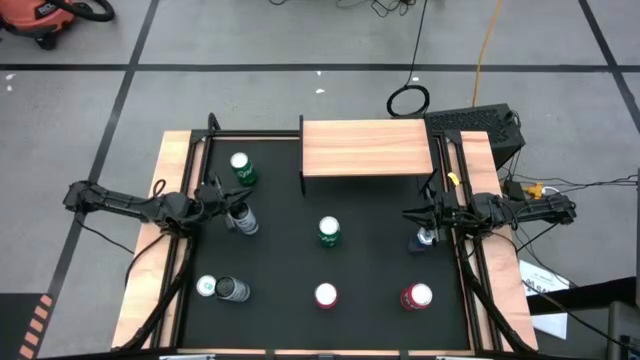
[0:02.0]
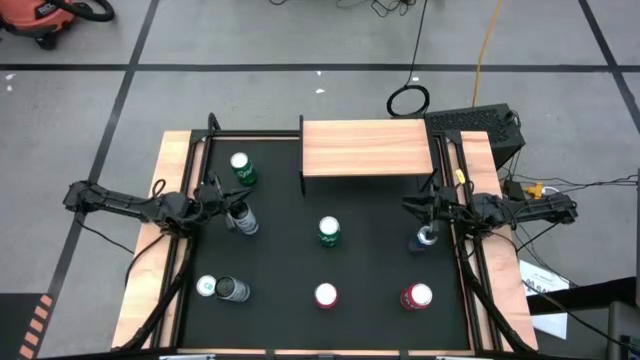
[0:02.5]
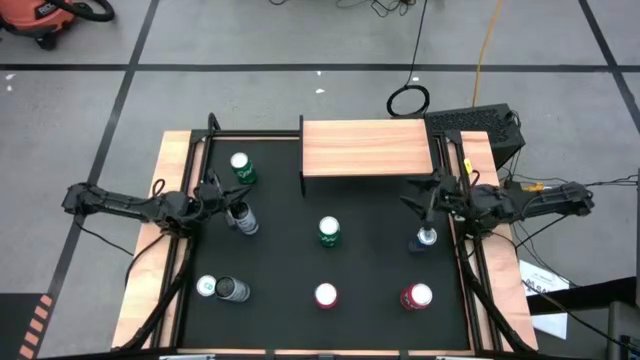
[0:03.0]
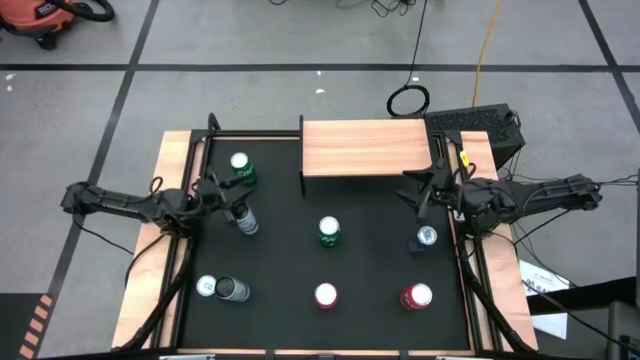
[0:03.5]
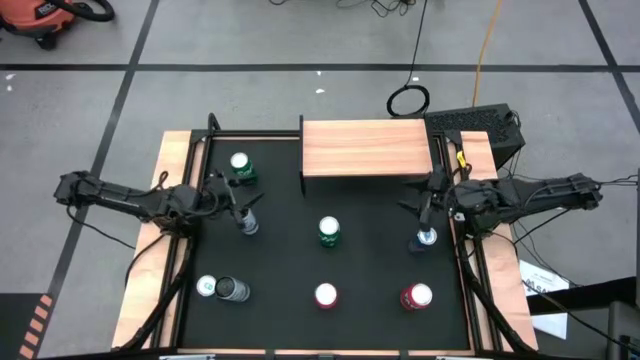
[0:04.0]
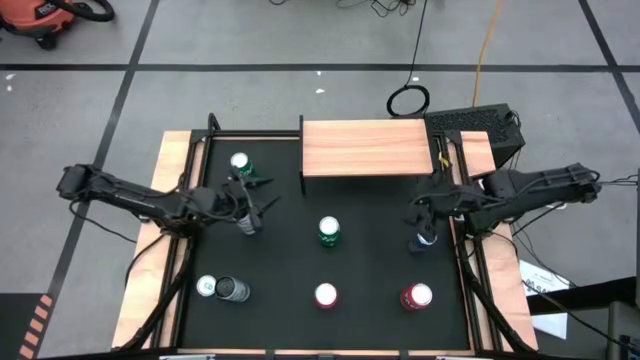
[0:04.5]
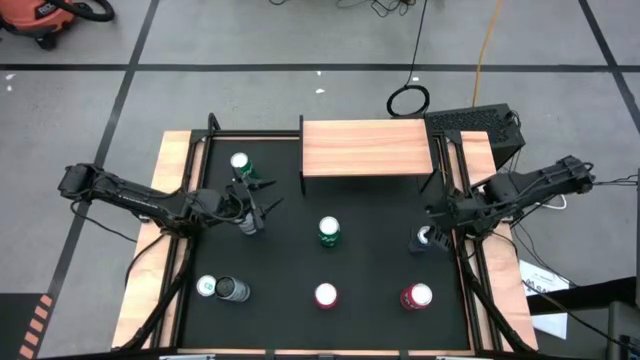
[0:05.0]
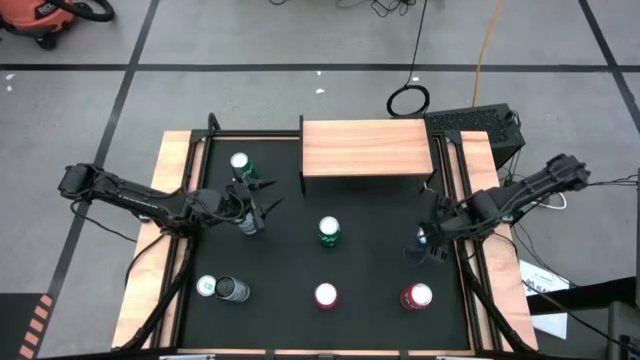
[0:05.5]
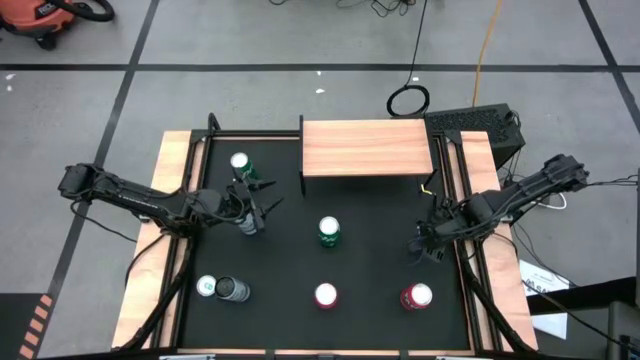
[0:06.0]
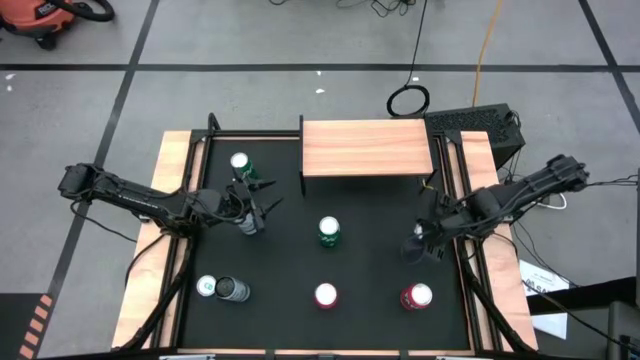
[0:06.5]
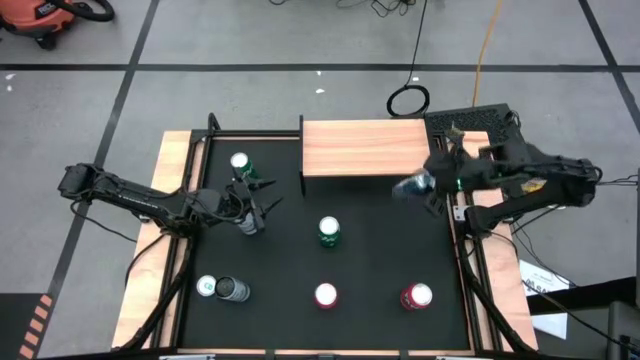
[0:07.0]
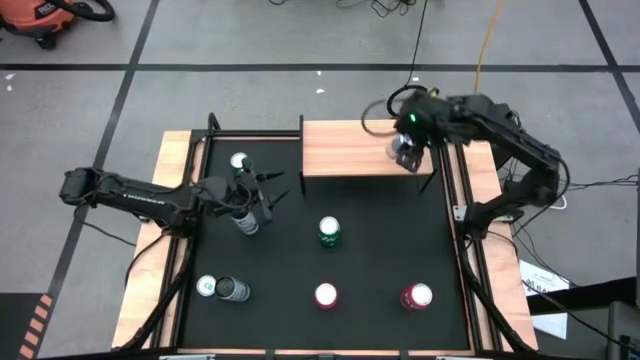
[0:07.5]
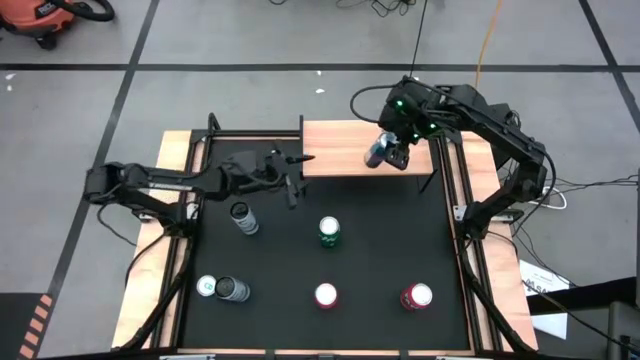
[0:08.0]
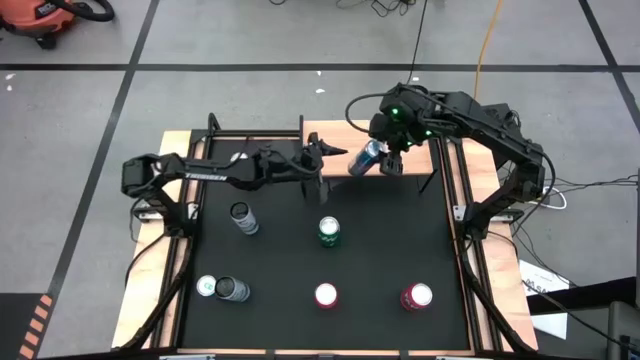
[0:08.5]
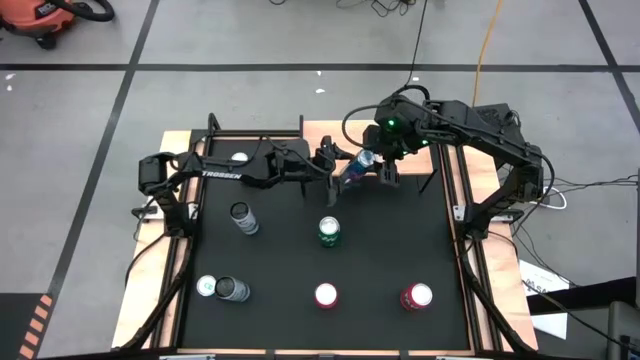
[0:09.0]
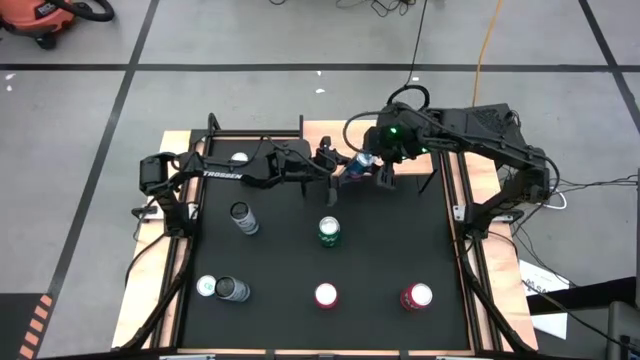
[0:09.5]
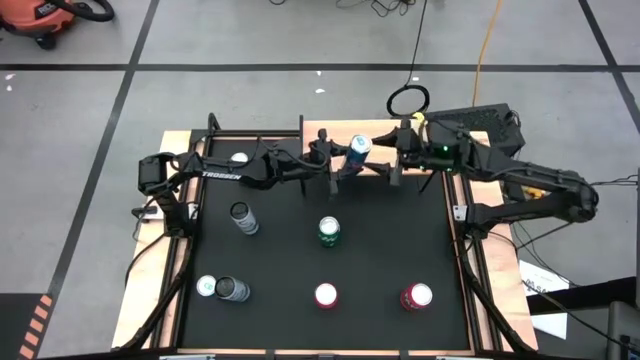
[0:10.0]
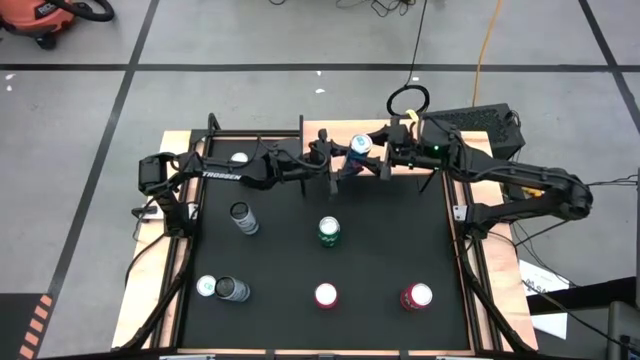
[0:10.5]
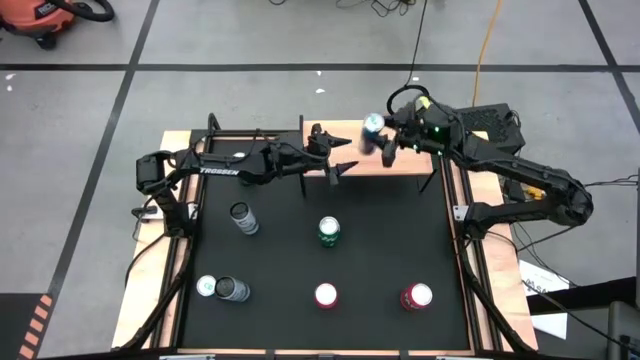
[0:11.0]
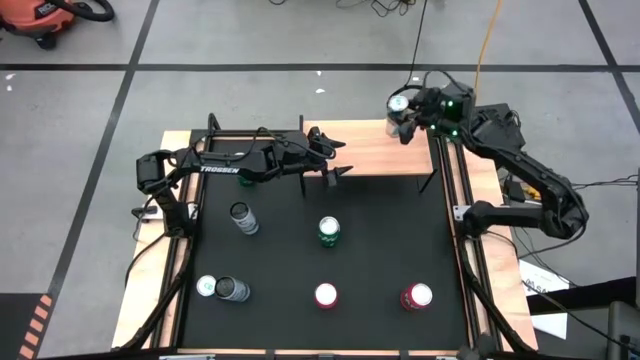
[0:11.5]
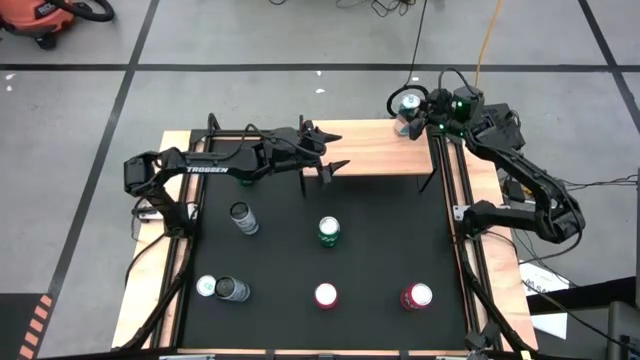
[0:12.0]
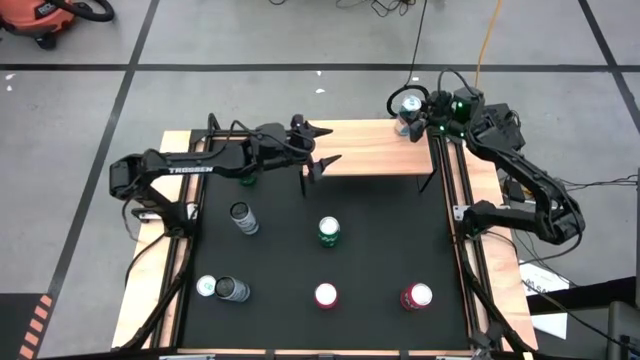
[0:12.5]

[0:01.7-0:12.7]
Task: Place canned beverage on shelf
Put the right blue soda can on the shelf

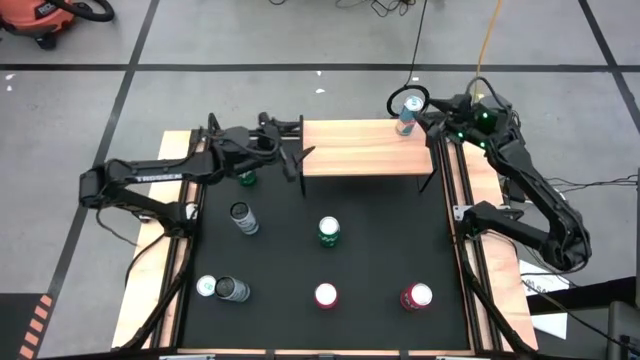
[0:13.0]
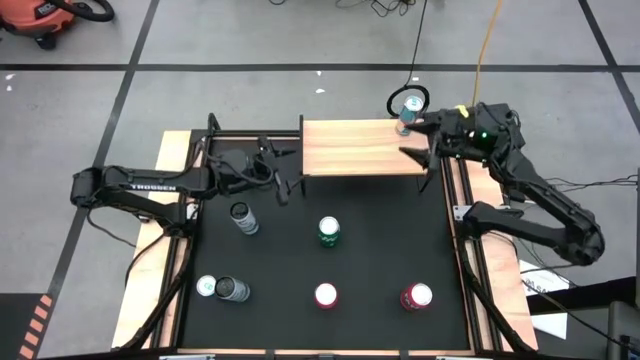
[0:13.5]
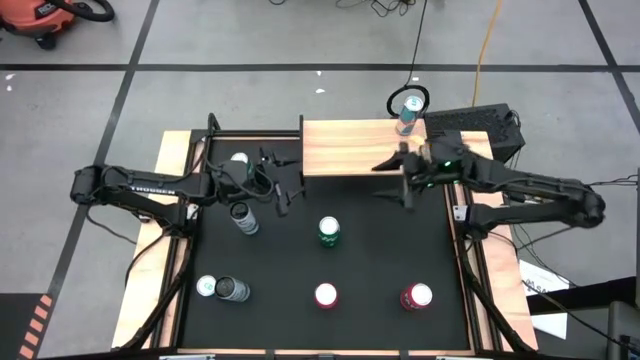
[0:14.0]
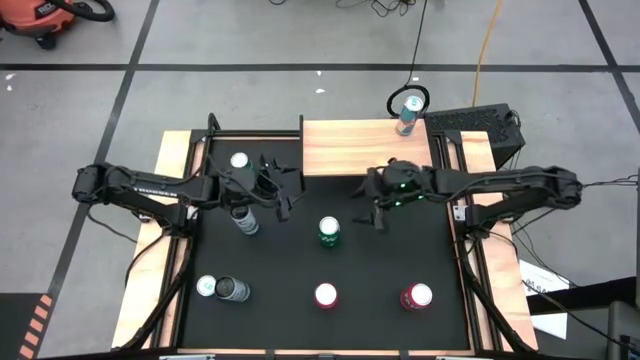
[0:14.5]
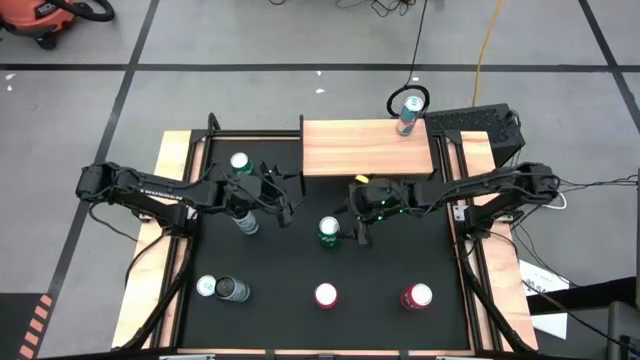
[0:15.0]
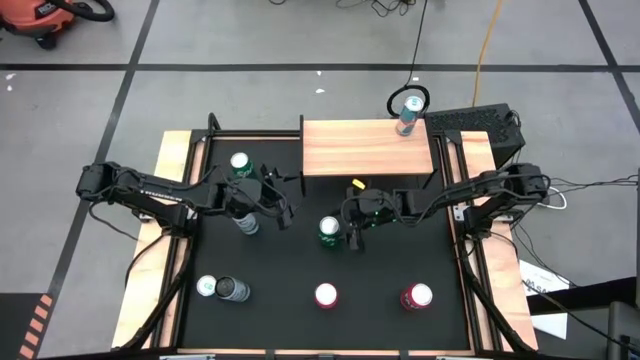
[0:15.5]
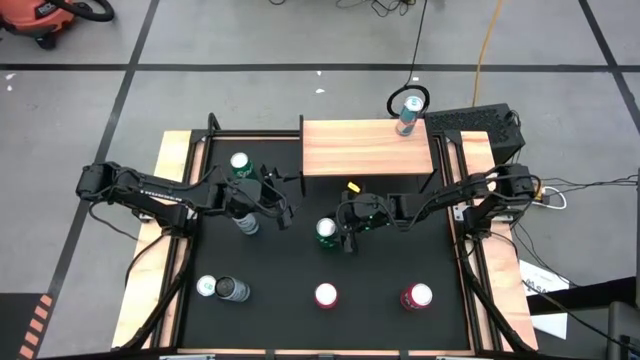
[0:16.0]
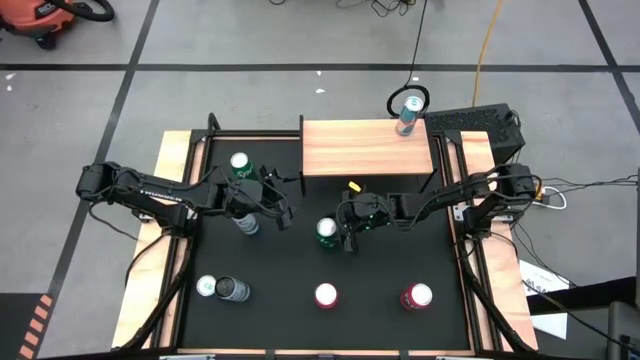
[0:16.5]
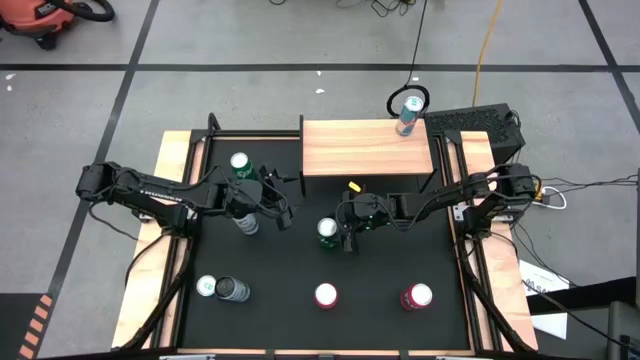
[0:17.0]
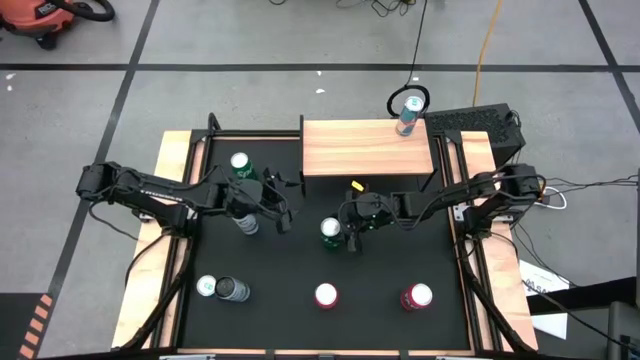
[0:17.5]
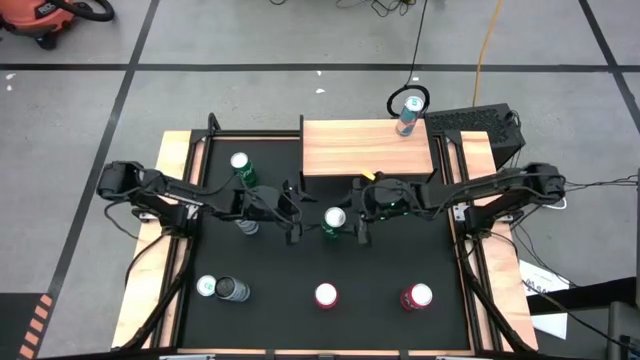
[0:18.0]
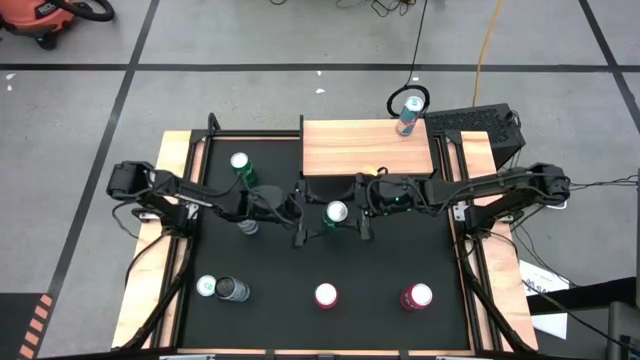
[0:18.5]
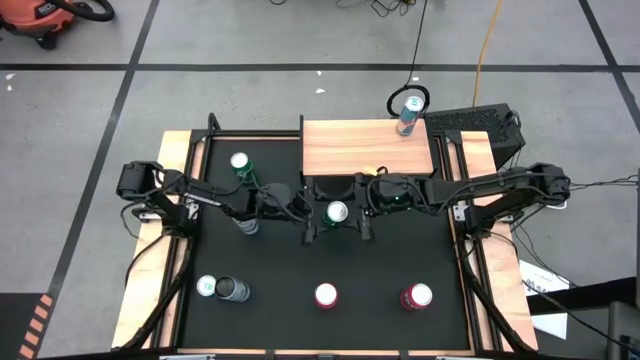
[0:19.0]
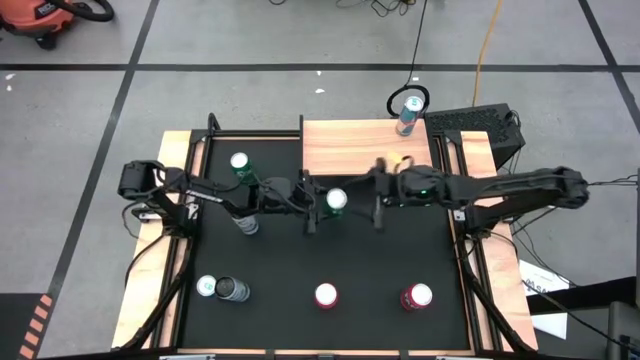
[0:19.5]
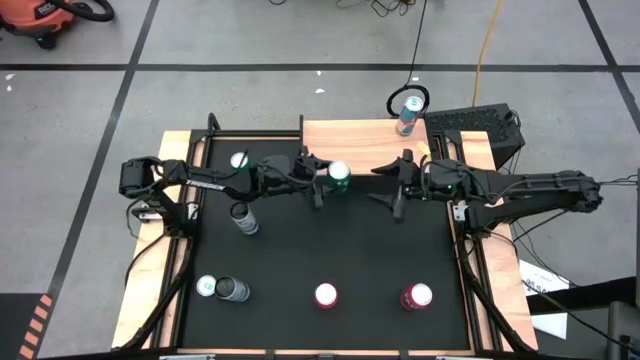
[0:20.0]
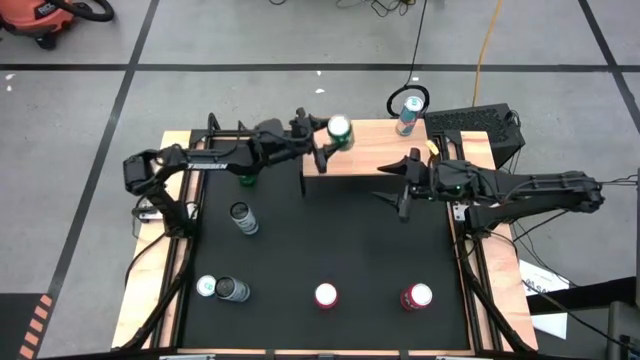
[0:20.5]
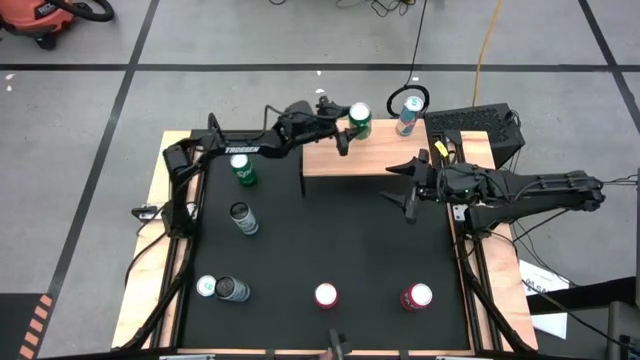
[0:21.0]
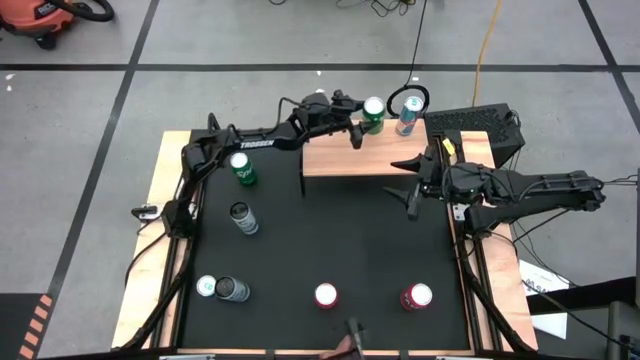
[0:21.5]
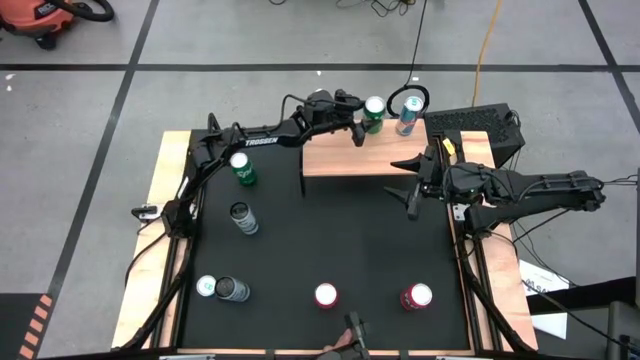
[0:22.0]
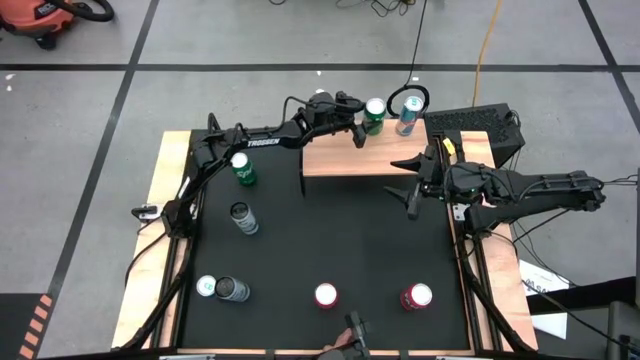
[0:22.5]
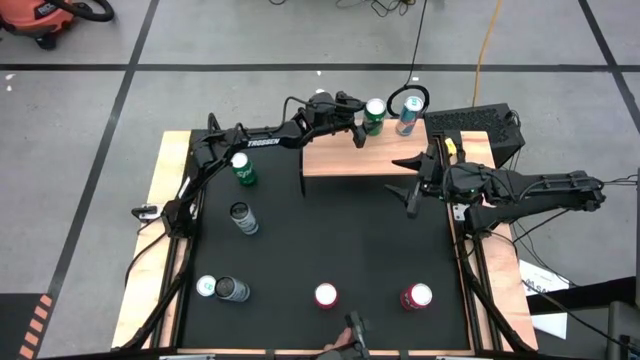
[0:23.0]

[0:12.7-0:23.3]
Put the right green soda can on the shelf

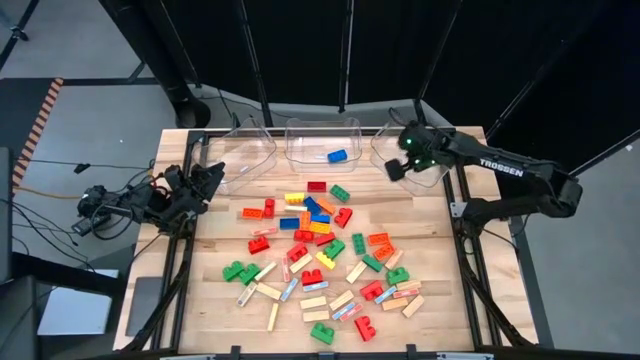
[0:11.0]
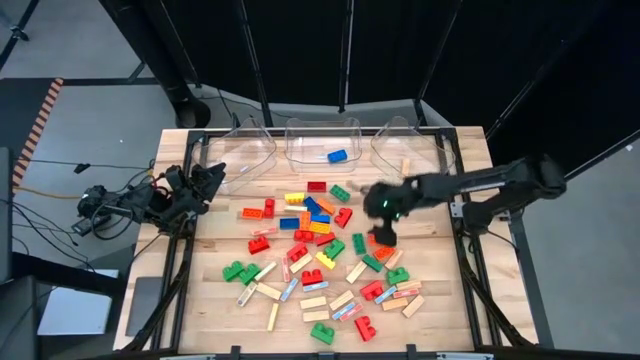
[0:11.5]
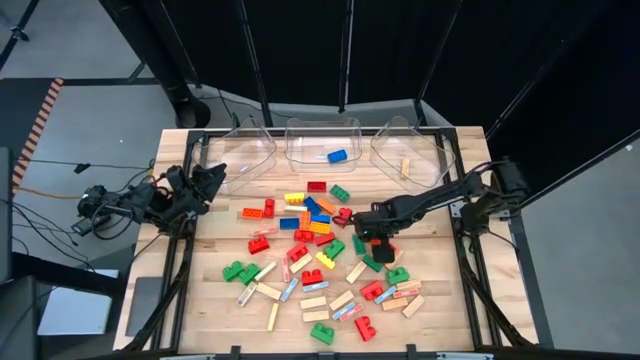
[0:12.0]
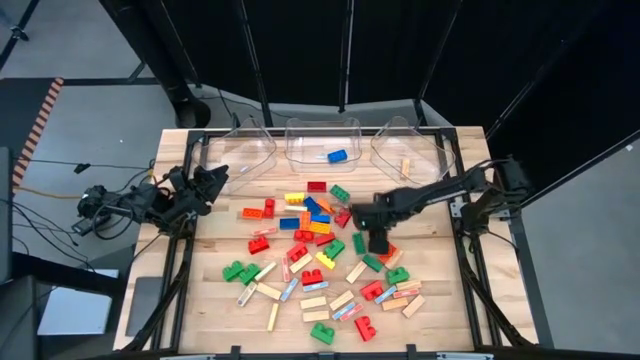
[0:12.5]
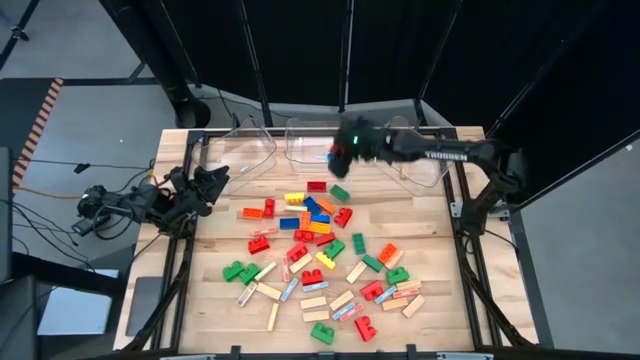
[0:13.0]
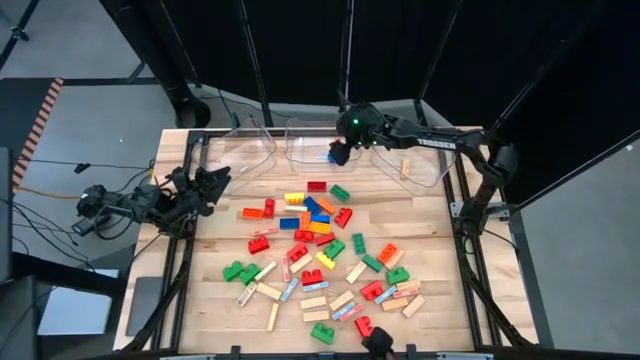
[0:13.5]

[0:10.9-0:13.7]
Task: Sort blocks by size
Put the large orange game piece into the middle transparent bin
